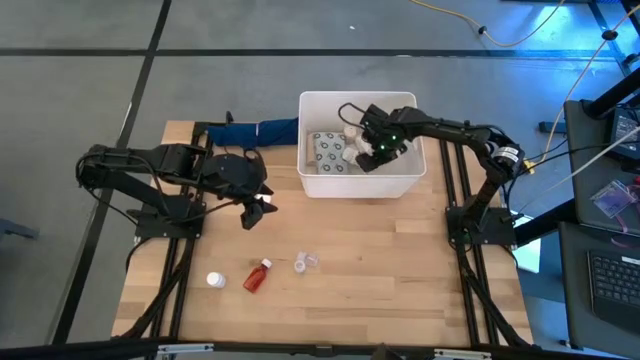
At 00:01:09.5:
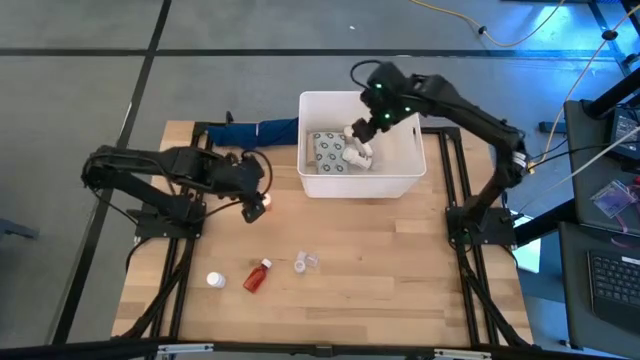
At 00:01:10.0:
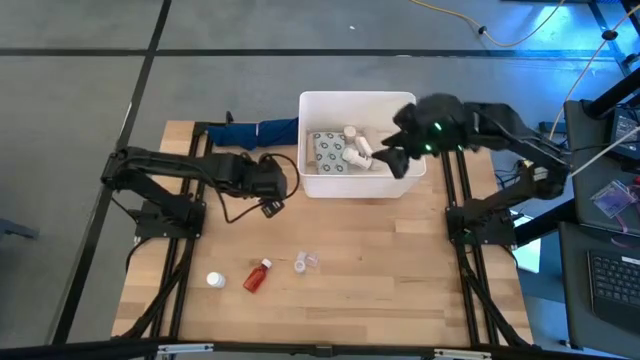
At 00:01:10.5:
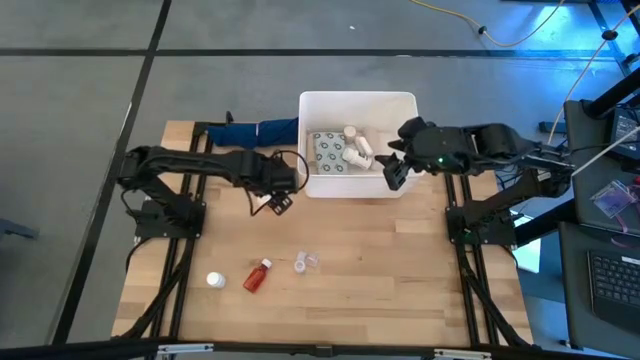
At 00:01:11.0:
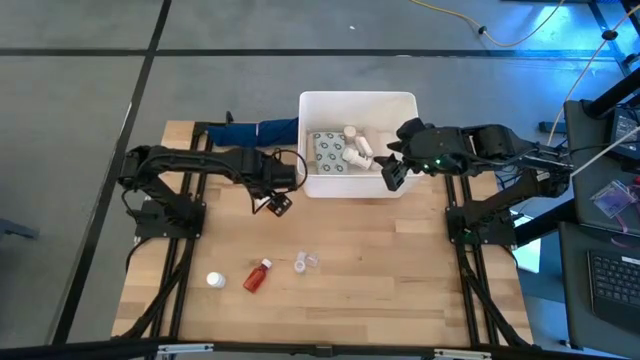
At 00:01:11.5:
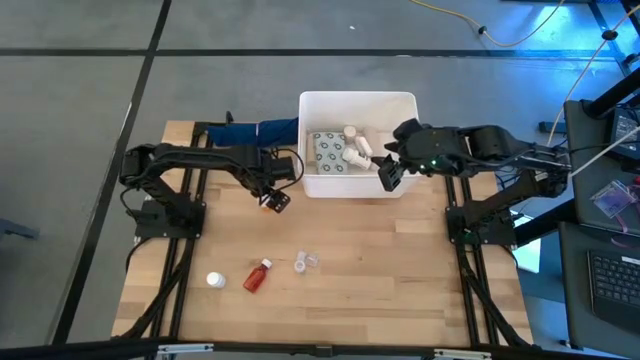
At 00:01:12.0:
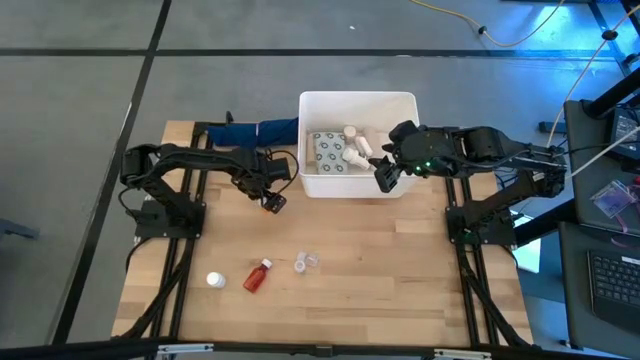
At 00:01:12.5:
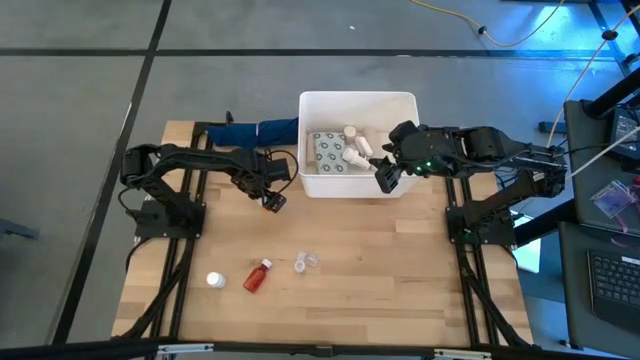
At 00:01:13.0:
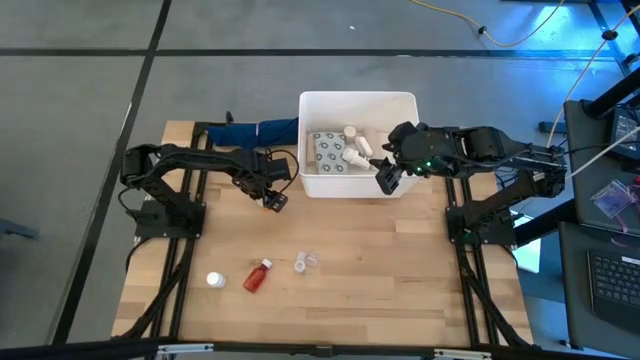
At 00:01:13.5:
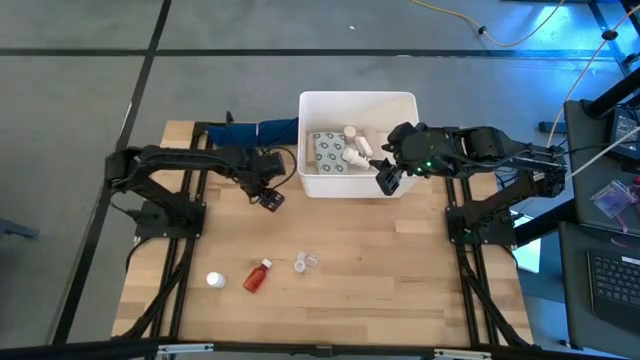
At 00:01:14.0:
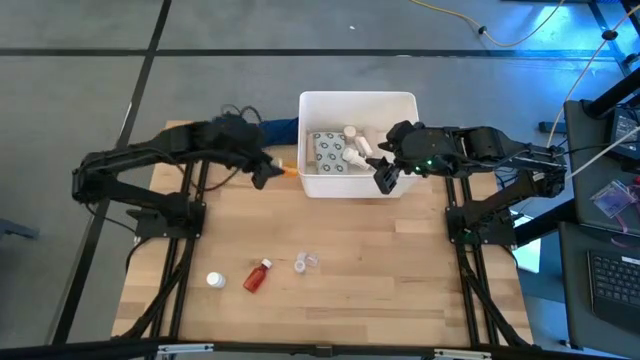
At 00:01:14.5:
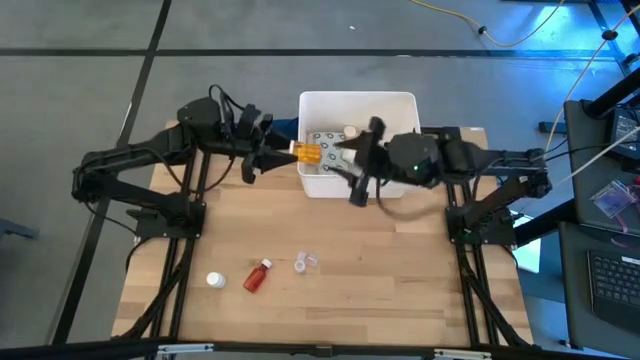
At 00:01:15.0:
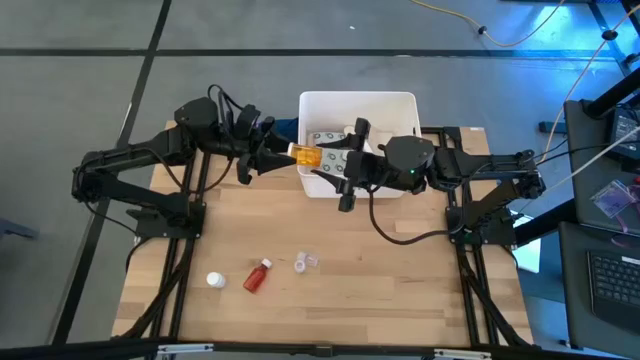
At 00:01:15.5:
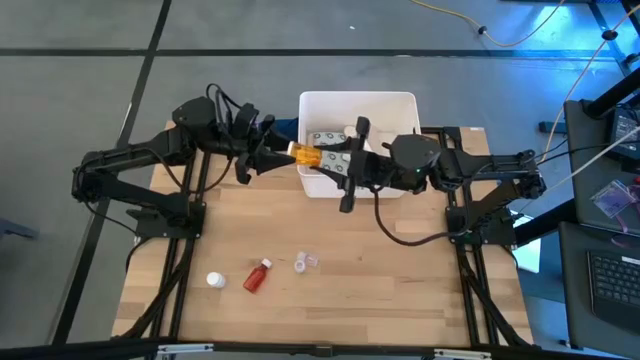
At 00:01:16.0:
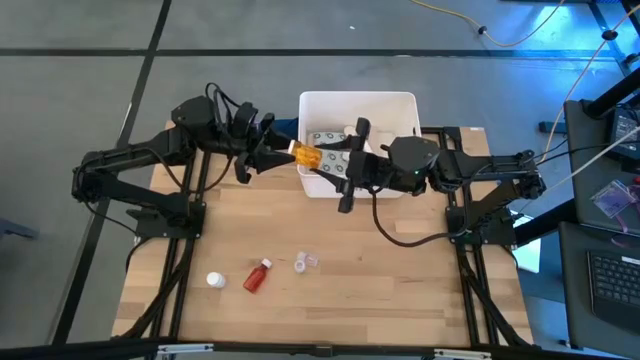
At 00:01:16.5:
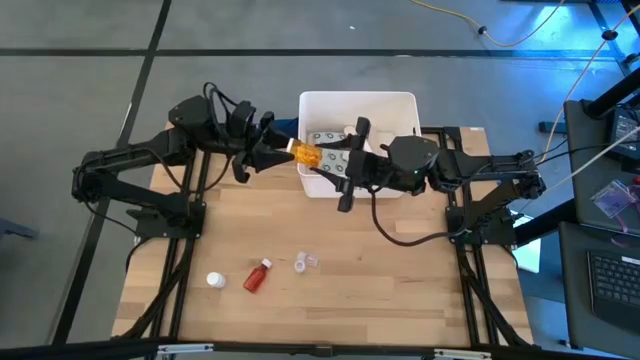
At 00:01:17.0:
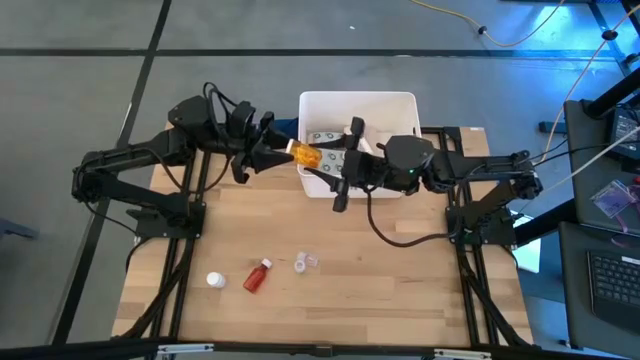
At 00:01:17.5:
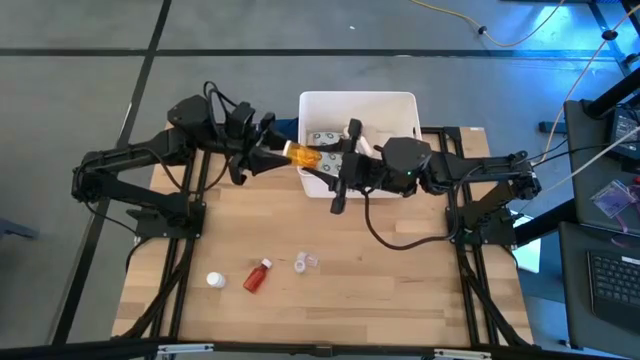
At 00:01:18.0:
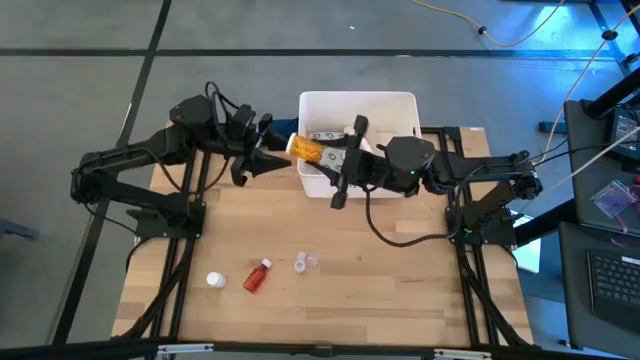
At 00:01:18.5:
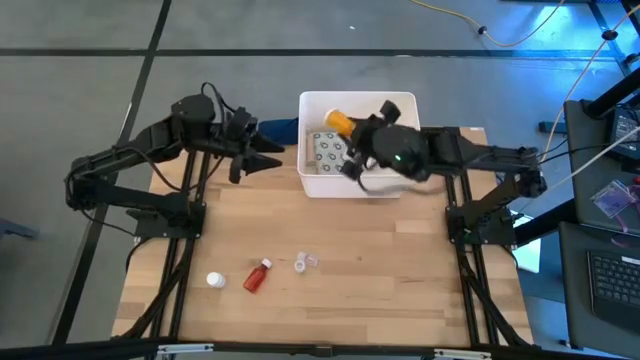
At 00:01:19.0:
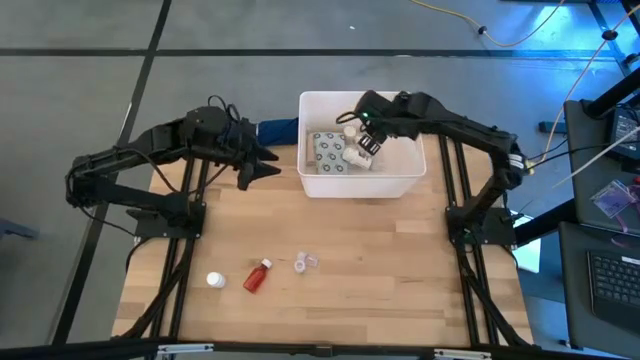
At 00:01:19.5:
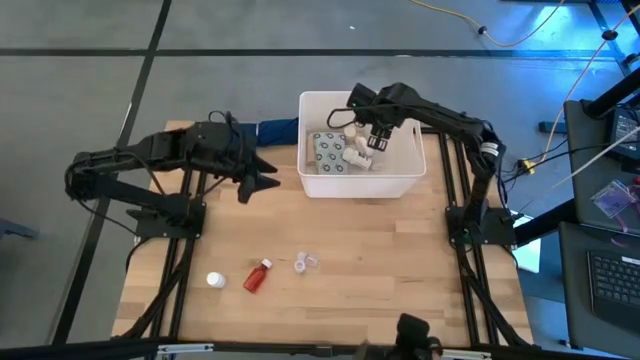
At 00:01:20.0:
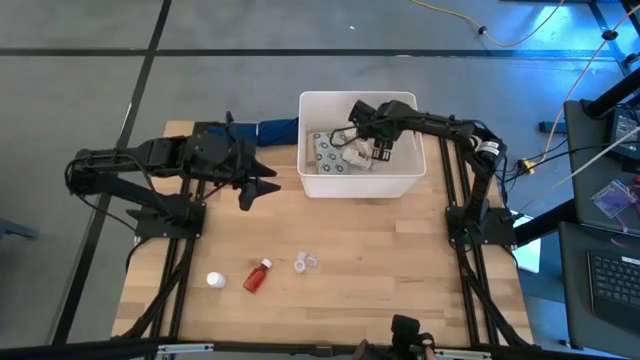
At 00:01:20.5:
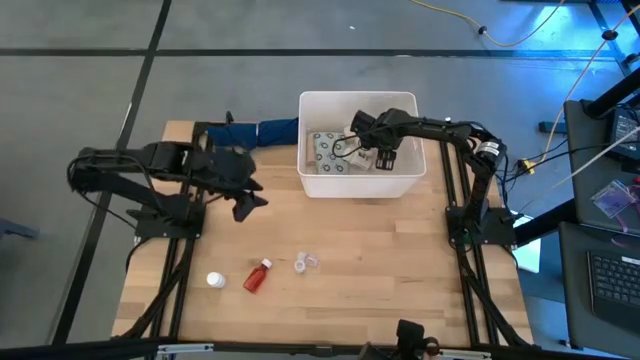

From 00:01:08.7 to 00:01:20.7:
Task: Pick & place medical supplies in basket/bin
Put the orange pill bottle into the white bin

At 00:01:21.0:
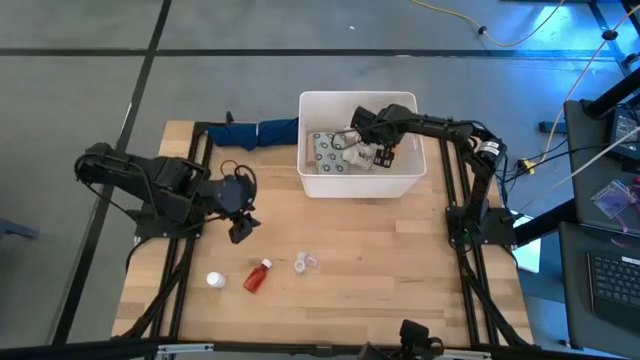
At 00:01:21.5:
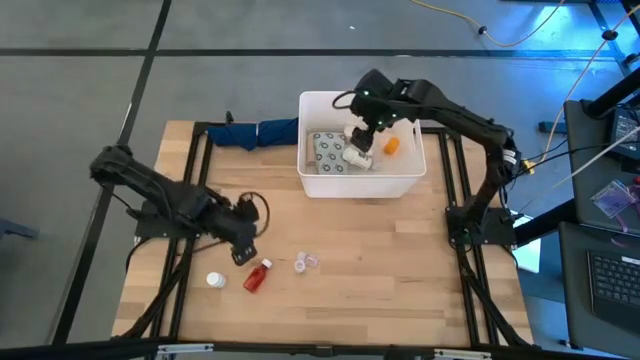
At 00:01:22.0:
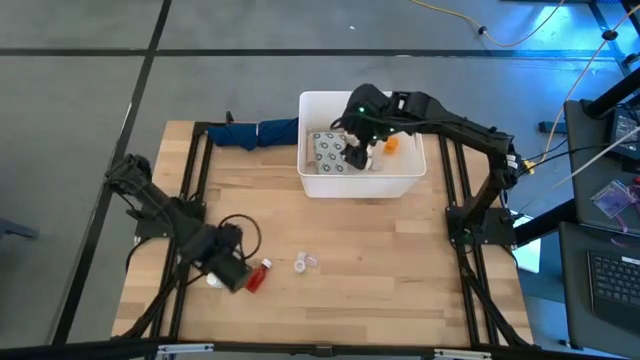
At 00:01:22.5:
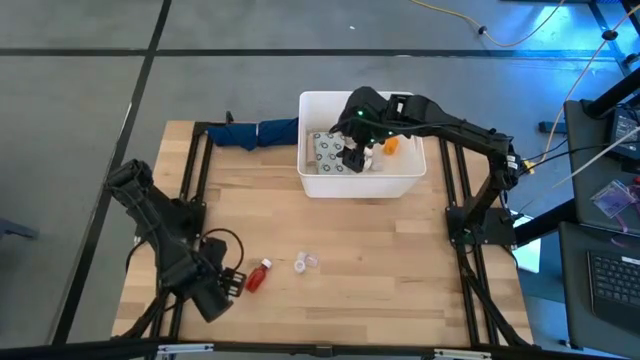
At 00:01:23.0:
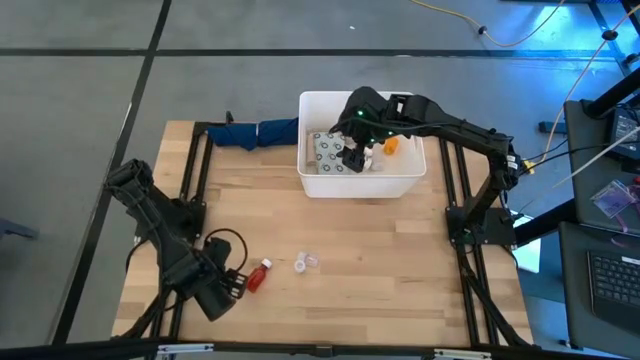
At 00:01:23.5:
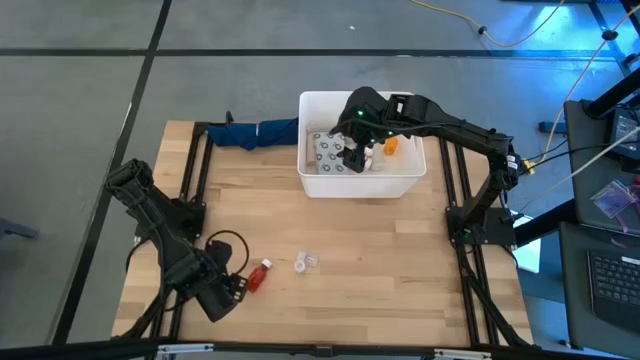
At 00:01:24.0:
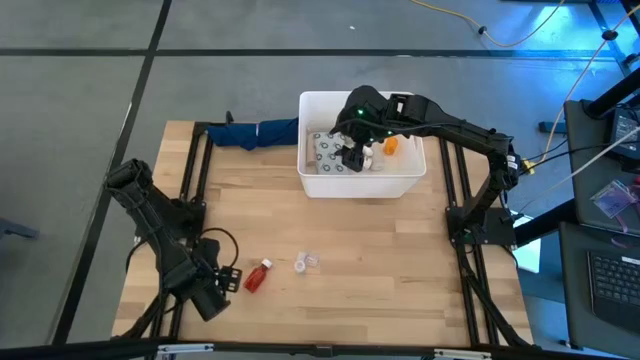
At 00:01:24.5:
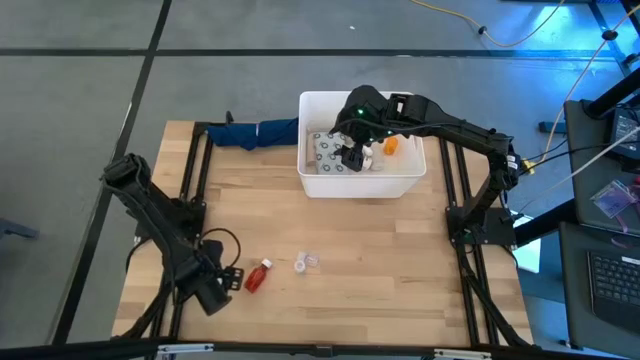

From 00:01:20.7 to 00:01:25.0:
Put the white pill bottle into the white bin

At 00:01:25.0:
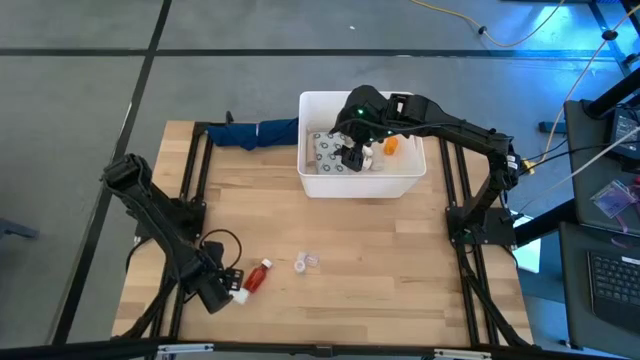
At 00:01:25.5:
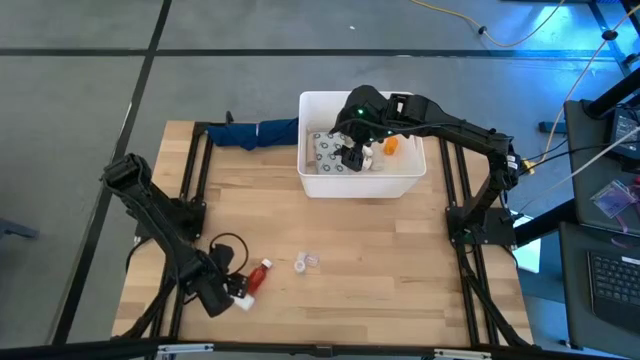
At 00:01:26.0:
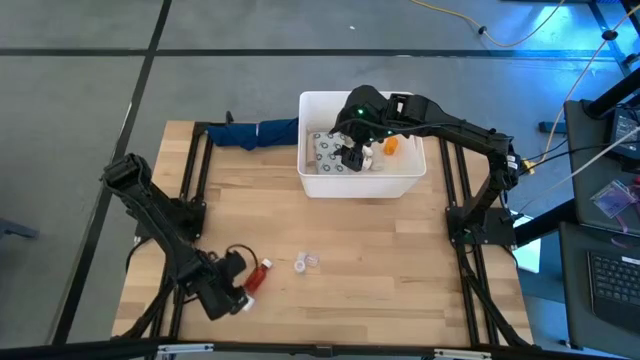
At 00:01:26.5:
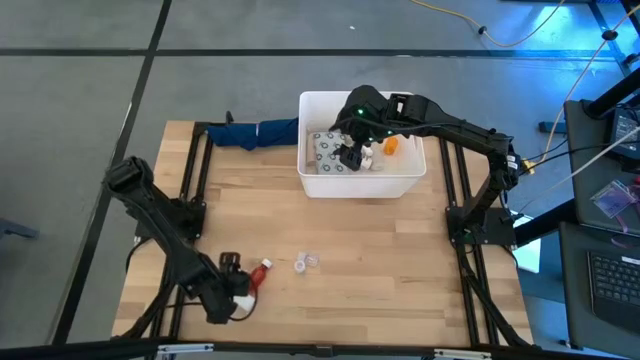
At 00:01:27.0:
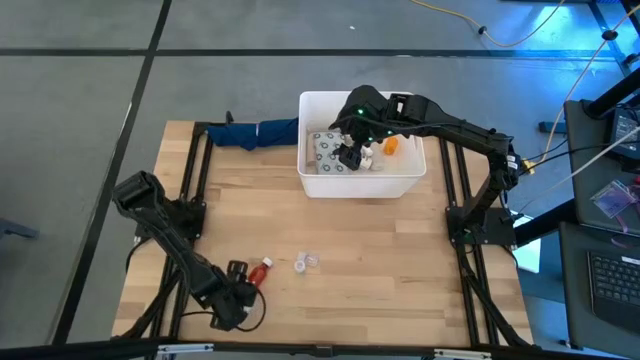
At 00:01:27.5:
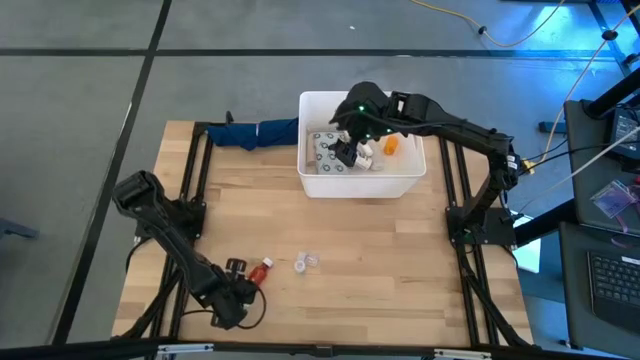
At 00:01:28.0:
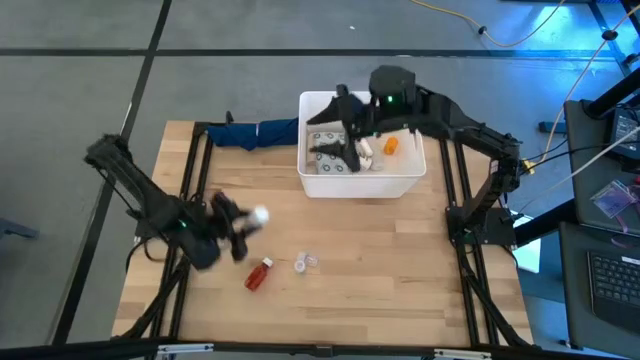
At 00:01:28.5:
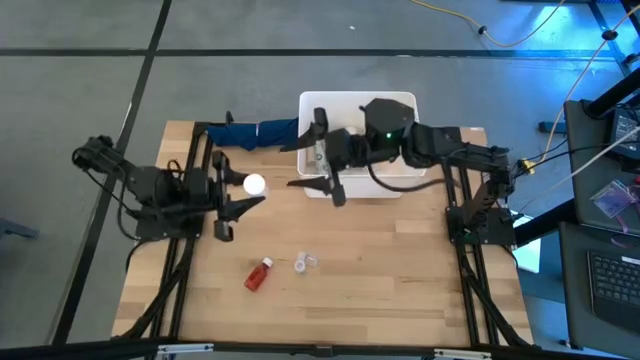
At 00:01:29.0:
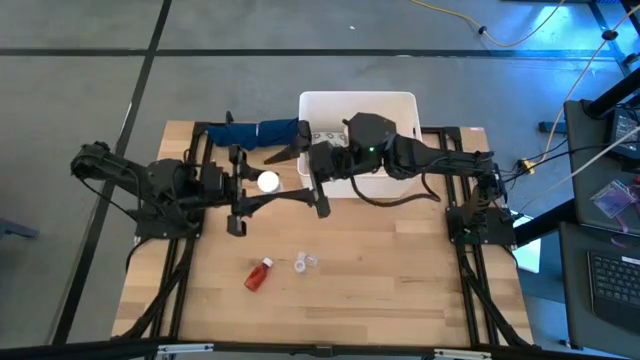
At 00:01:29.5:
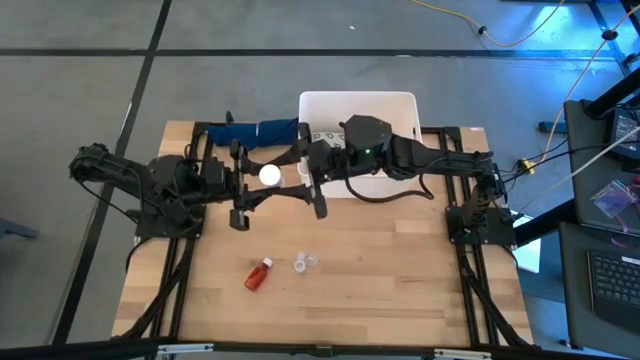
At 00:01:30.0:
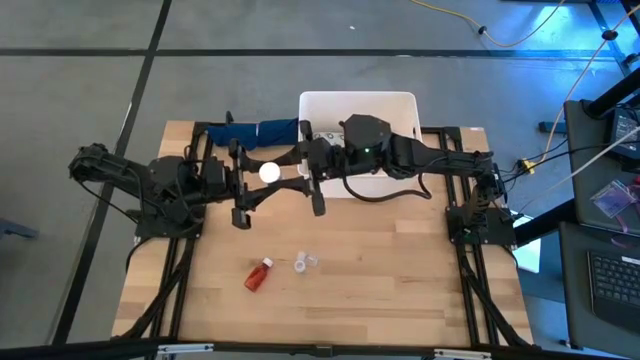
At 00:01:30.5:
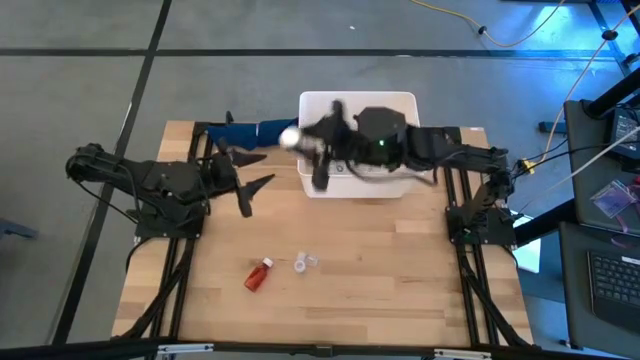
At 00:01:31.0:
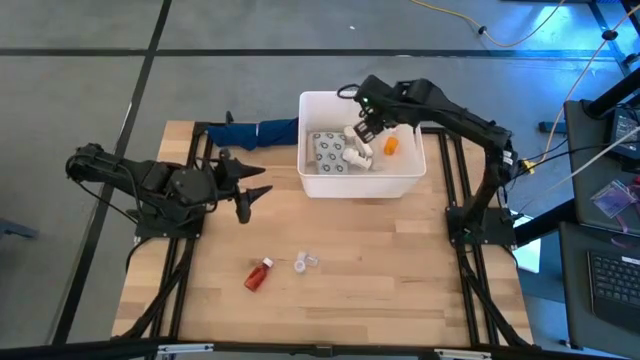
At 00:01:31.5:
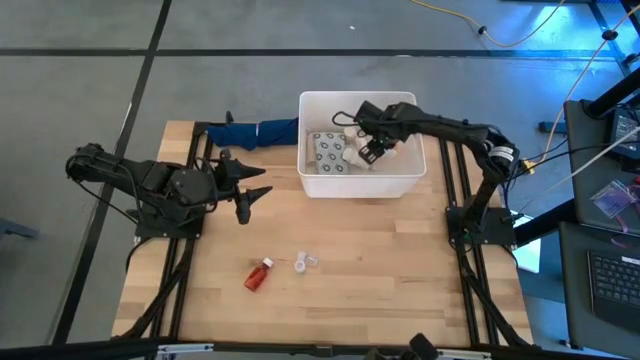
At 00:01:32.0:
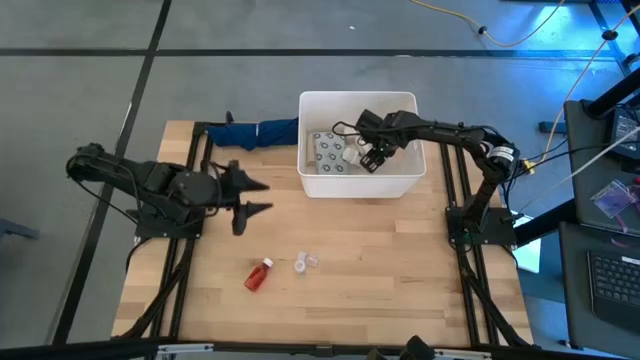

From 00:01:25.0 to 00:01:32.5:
Put the white pill bottle into the white bin
